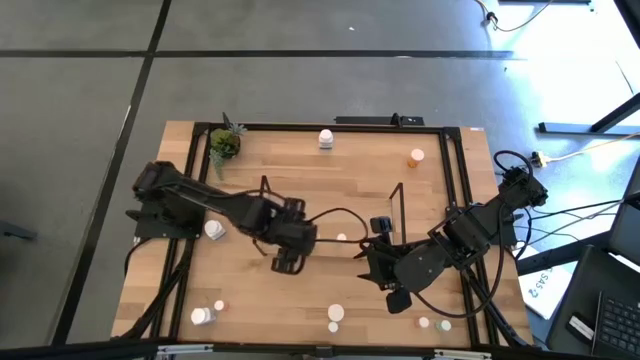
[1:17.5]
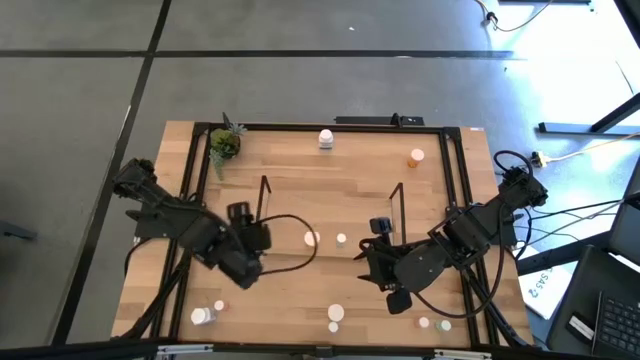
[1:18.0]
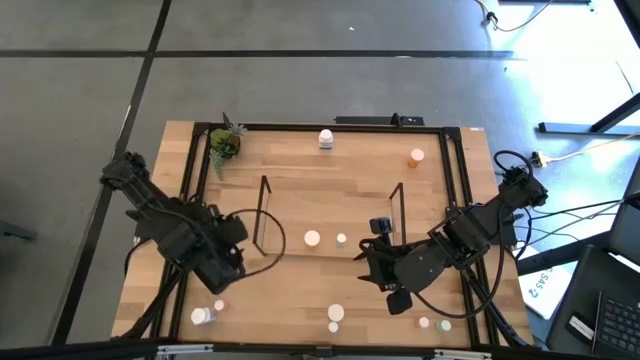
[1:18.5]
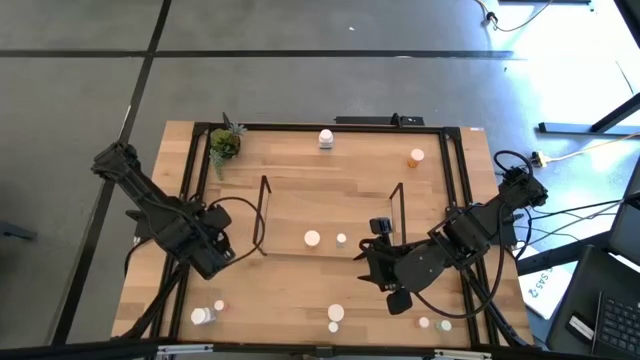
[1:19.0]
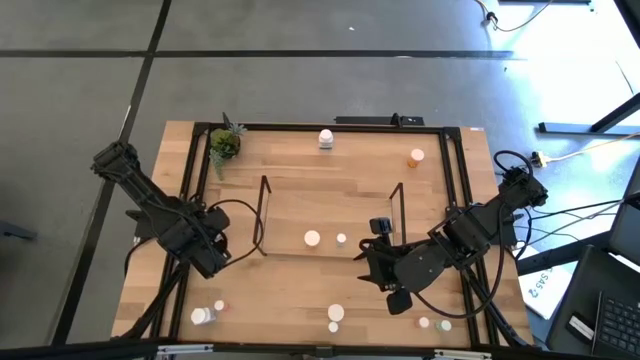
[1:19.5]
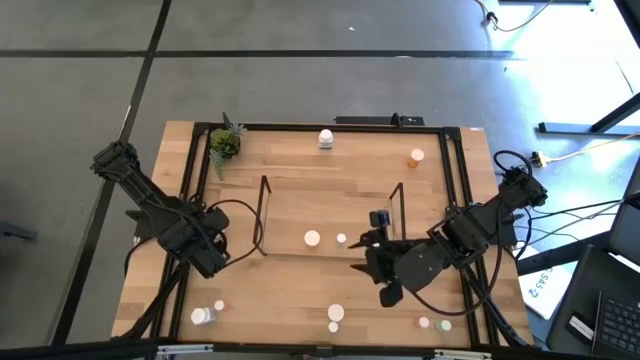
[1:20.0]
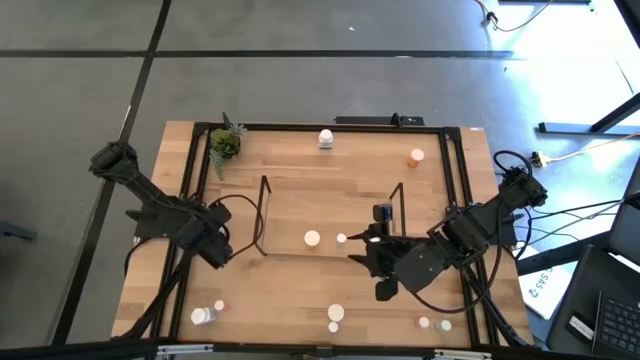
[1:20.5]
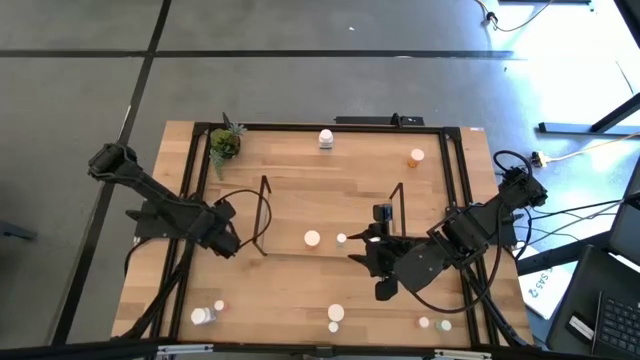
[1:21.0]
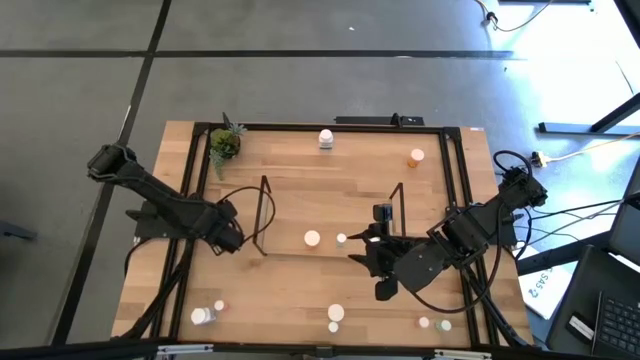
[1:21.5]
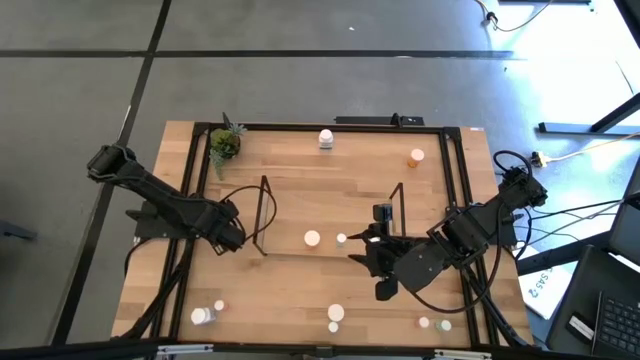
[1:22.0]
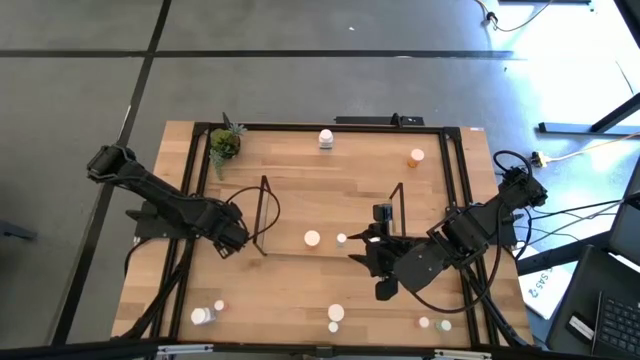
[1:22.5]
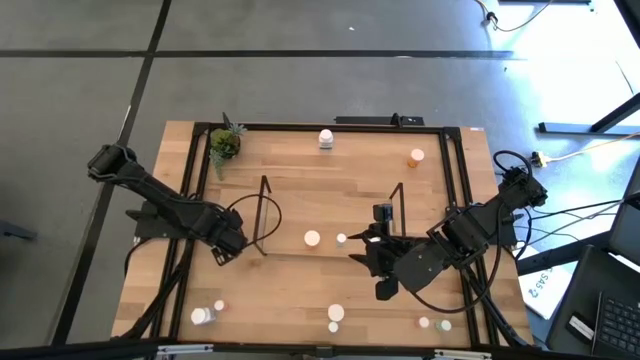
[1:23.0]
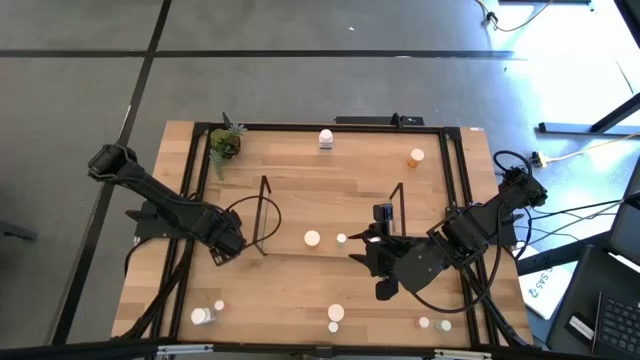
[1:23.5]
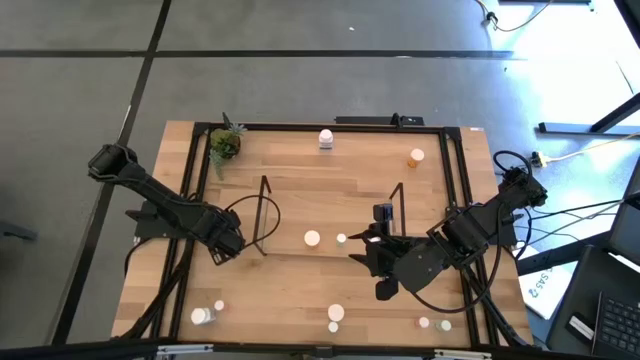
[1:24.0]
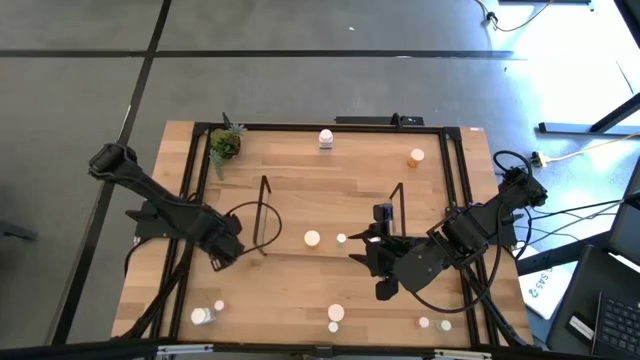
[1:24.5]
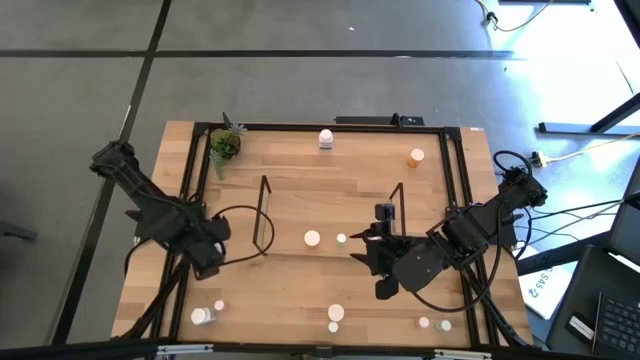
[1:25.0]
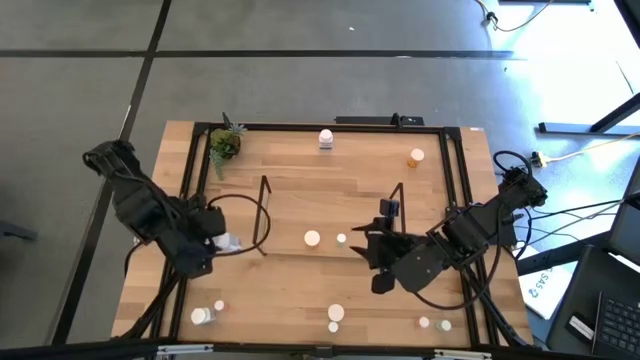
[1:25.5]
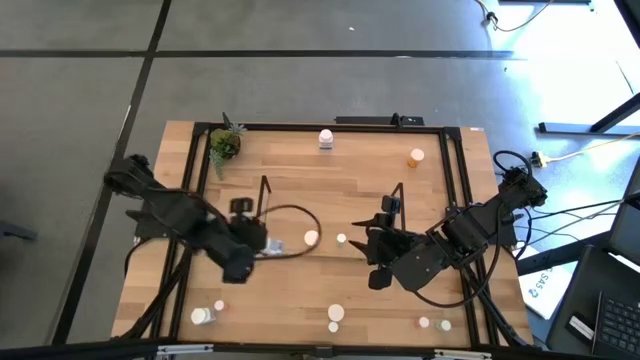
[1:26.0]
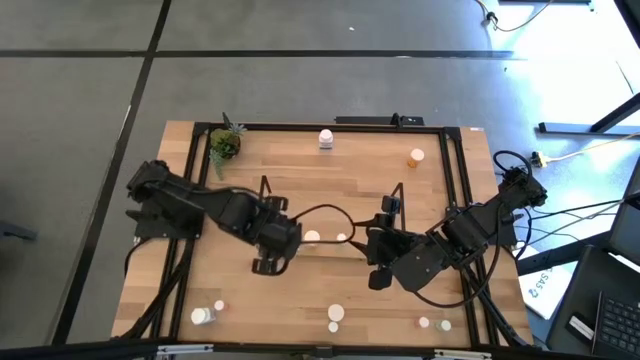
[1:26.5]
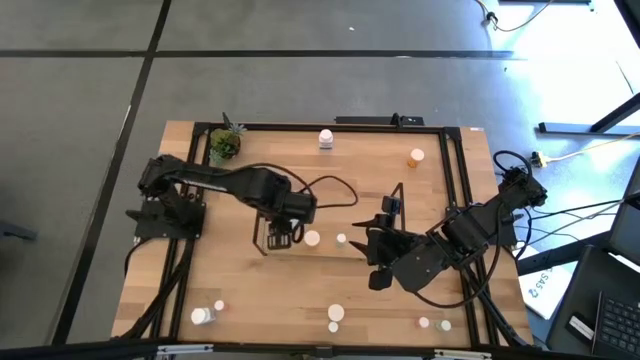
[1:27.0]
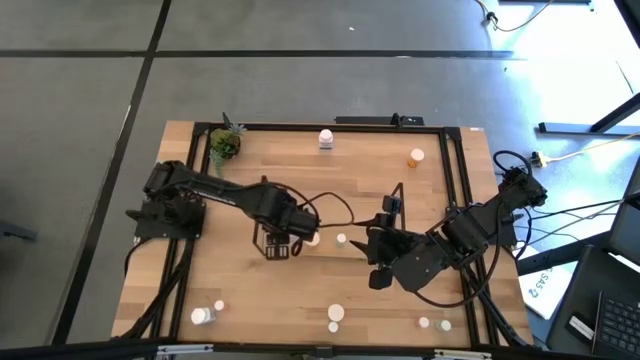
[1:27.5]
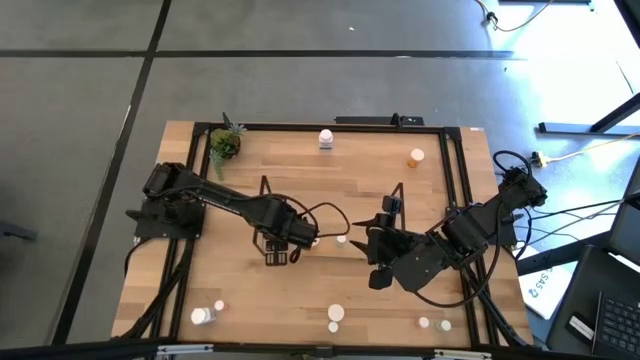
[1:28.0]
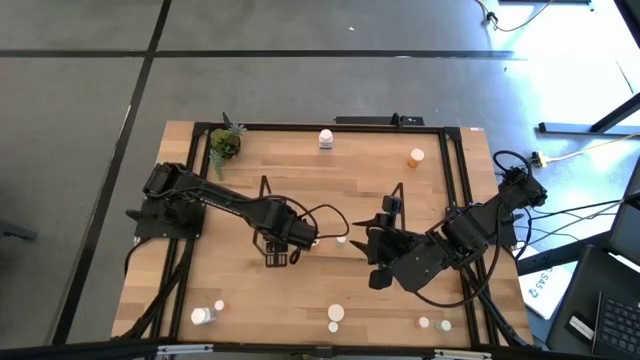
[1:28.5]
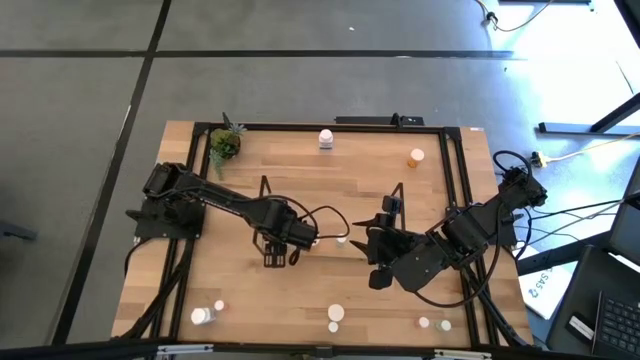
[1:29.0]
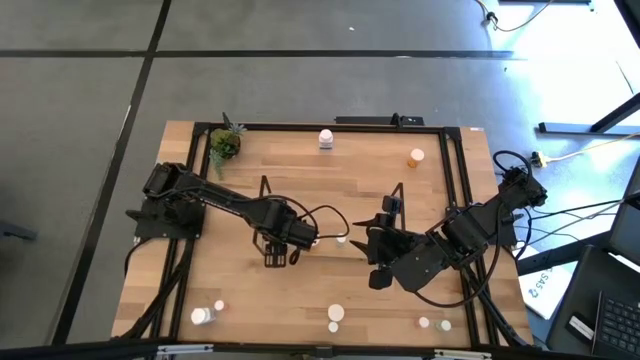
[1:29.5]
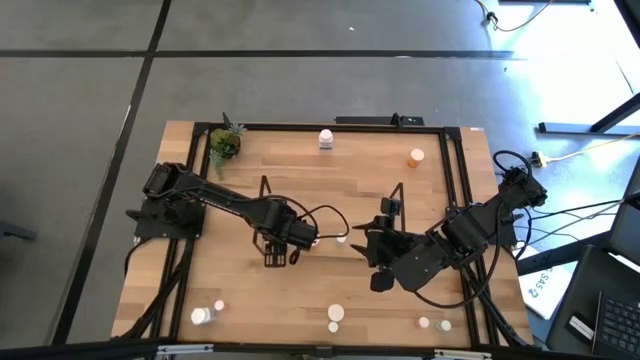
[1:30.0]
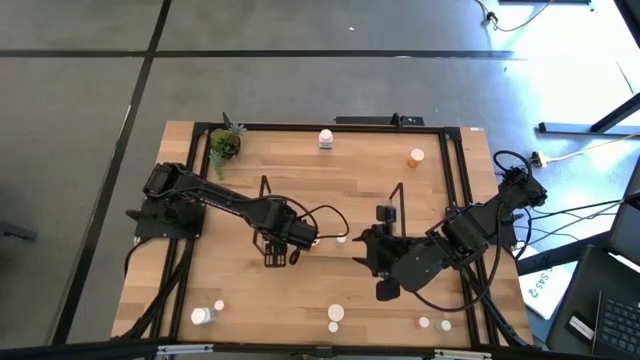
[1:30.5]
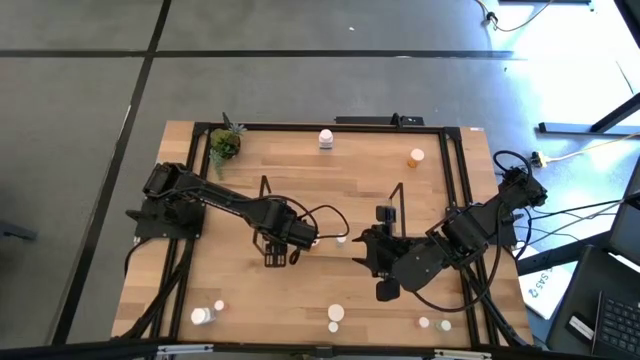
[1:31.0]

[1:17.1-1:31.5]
Task: Pick and place medicine bottles onto shelf by color
Put the middle white pill bottle on the shelf

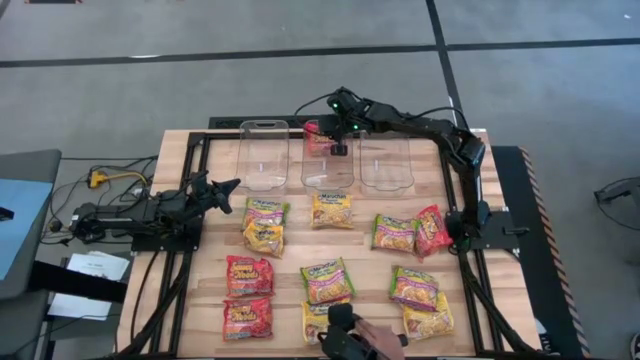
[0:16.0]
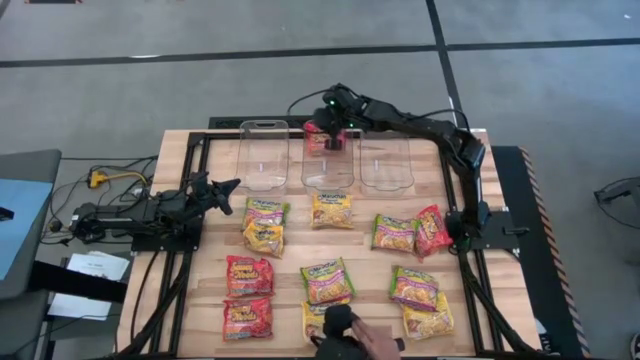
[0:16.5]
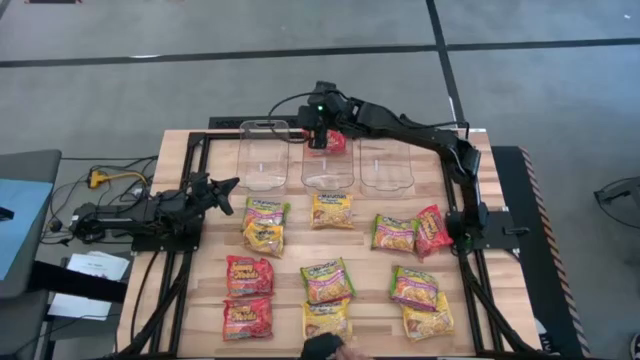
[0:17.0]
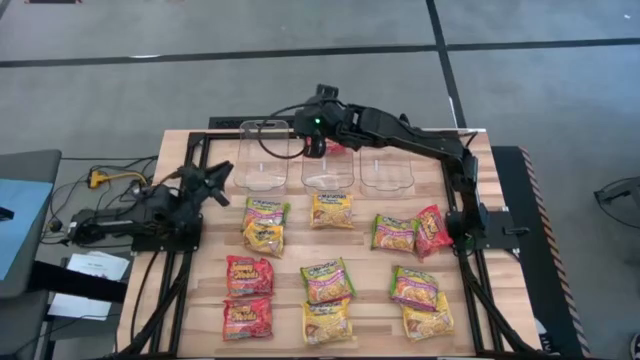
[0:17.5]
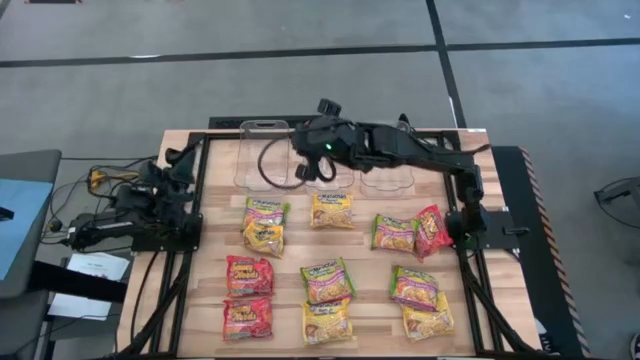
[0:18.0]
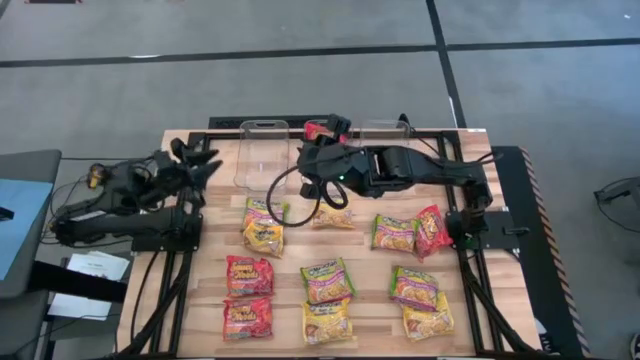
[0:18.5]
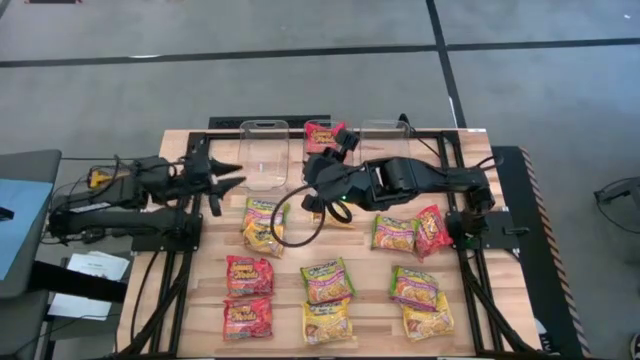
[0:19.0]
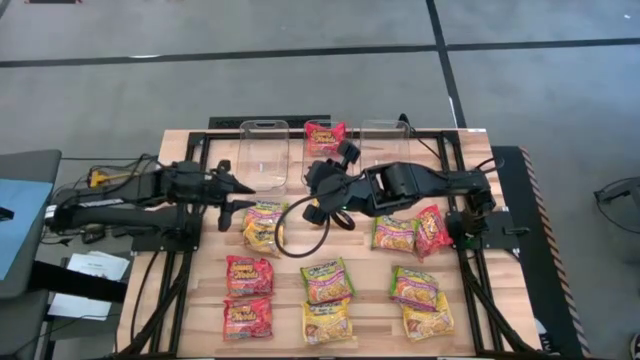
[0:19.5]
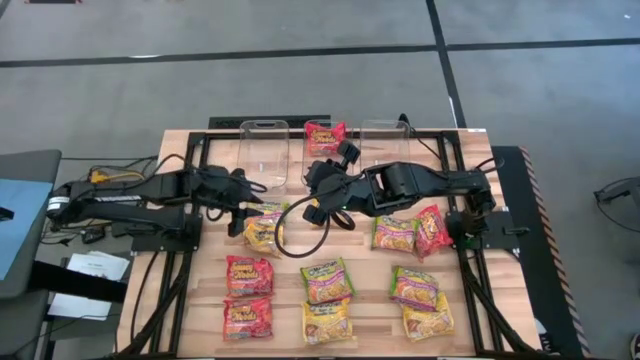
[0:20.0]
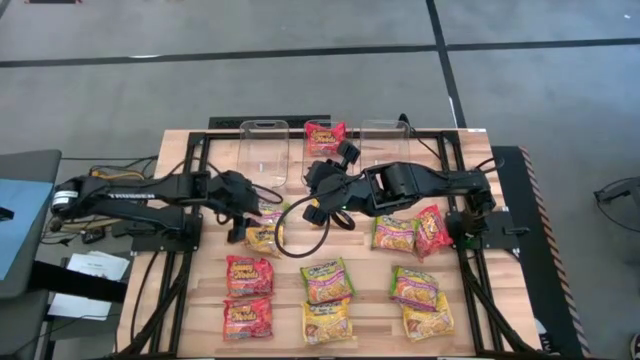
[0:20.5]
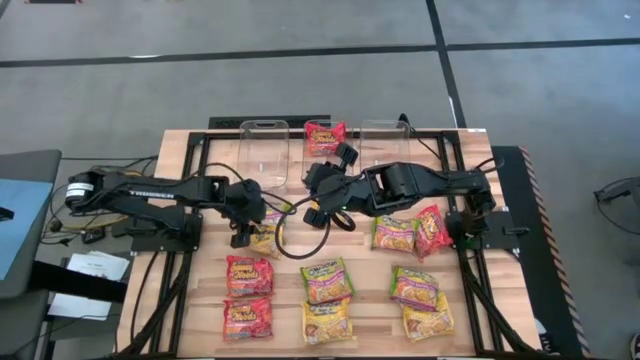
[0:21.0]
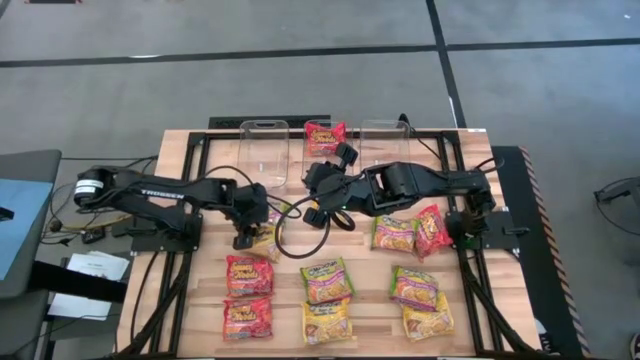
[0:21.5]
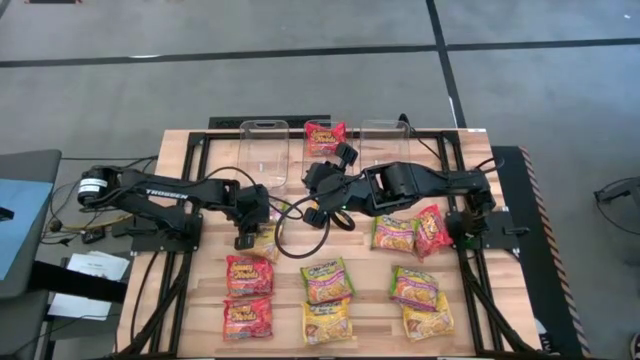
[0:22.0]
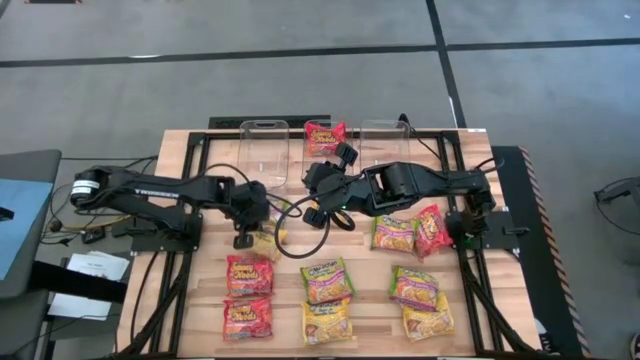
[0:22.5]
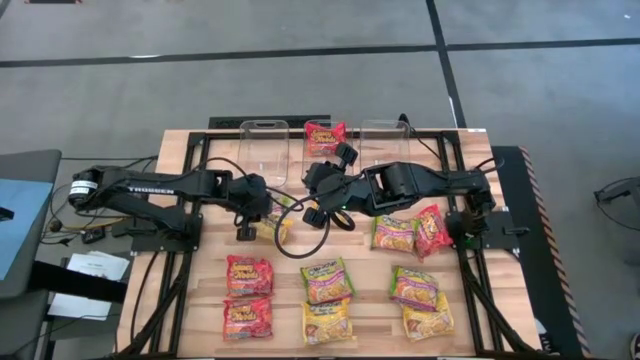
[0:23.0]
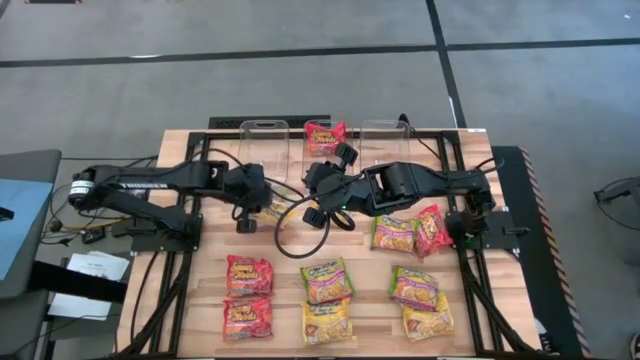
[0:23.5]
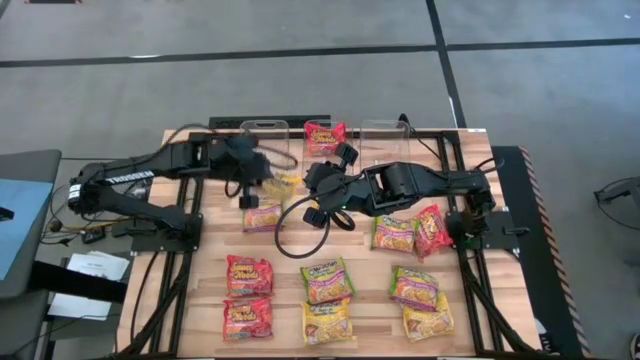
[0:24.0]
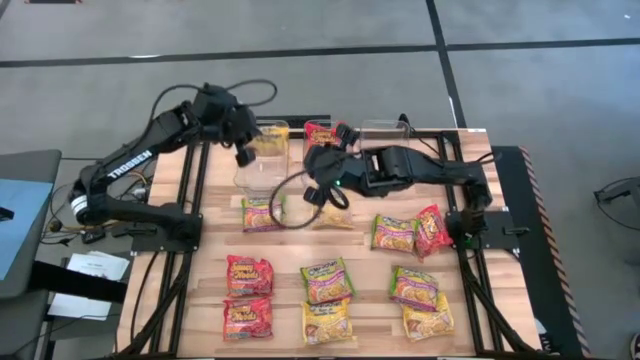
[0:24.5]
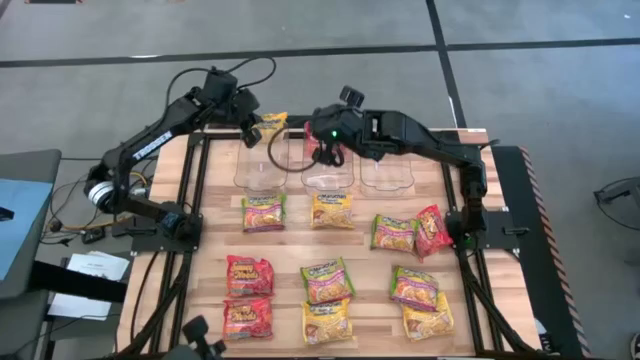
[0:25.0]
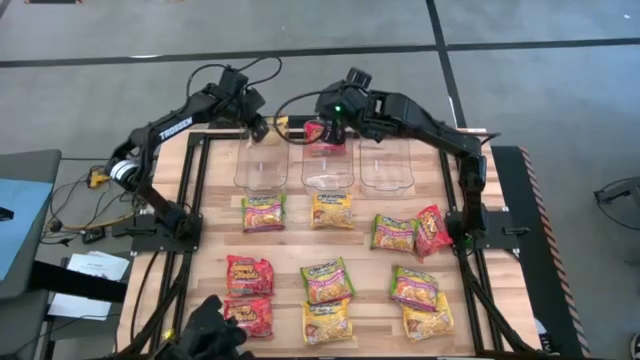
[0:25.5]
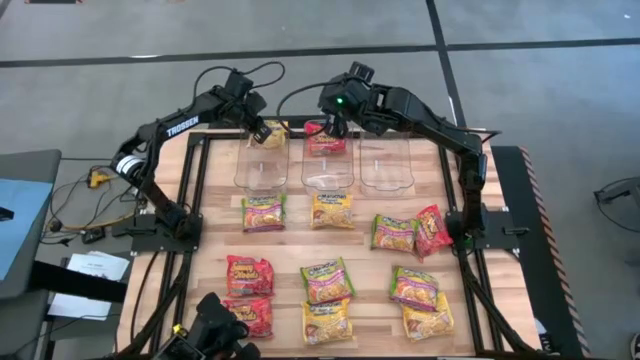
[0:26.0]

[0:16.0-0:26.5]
Task: Sort Maruchan noodles
Put the yellow noodle pack into the left transparent bin
